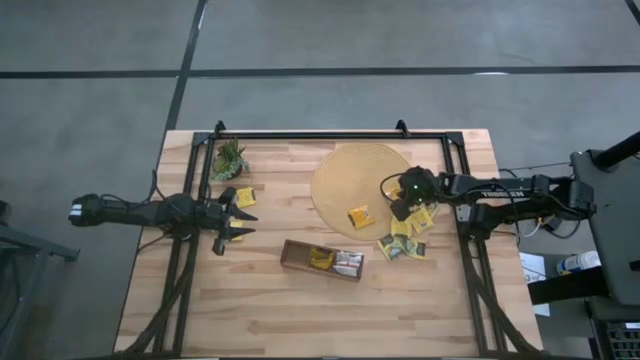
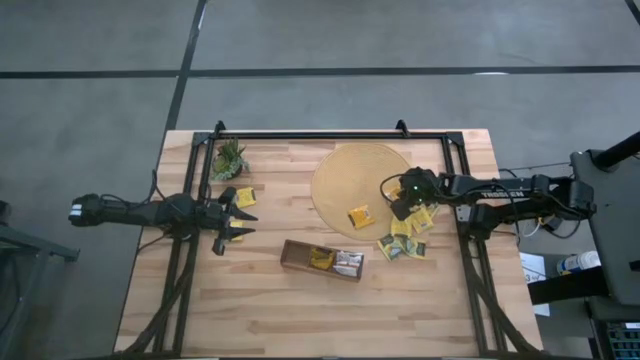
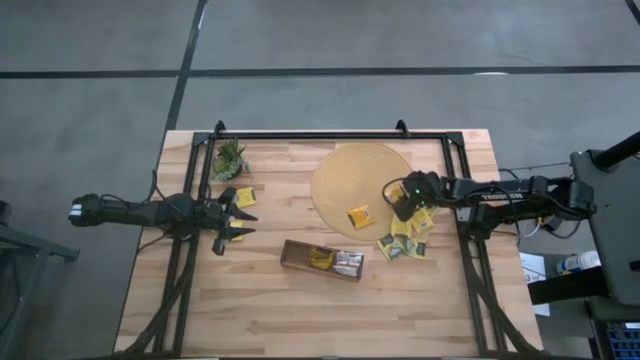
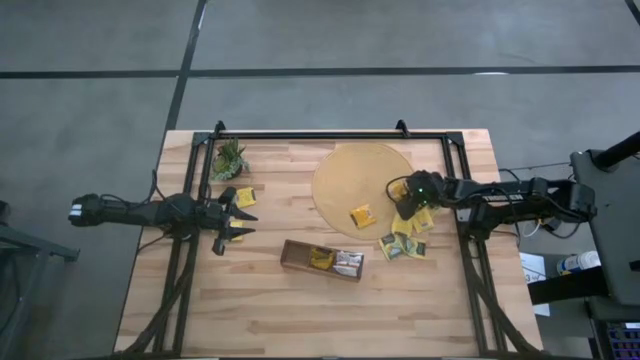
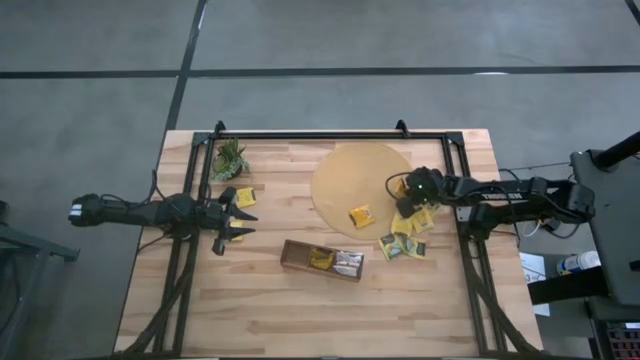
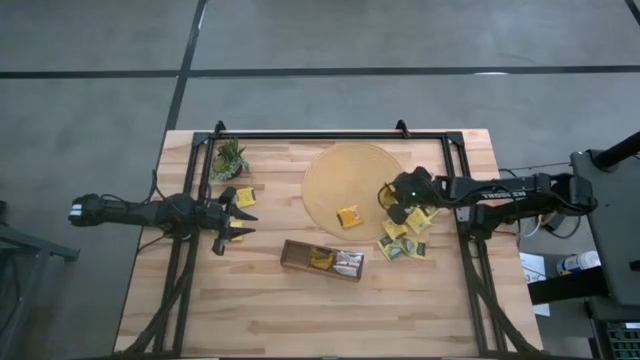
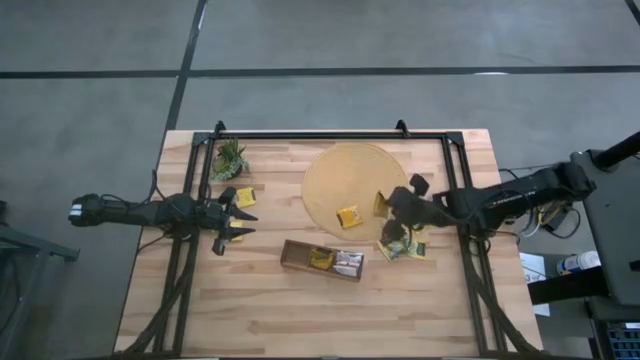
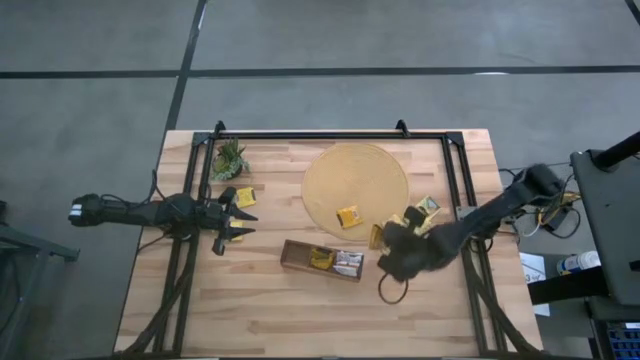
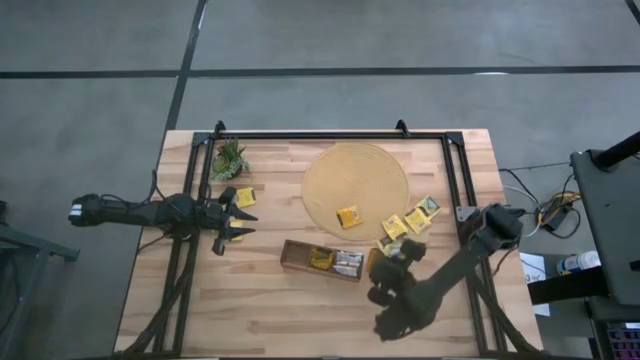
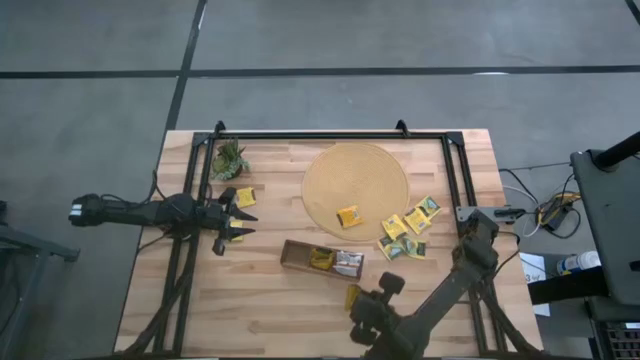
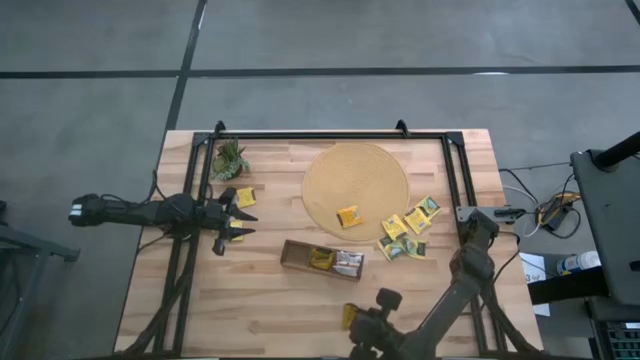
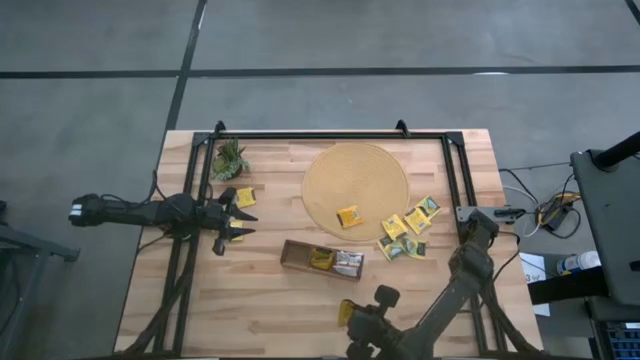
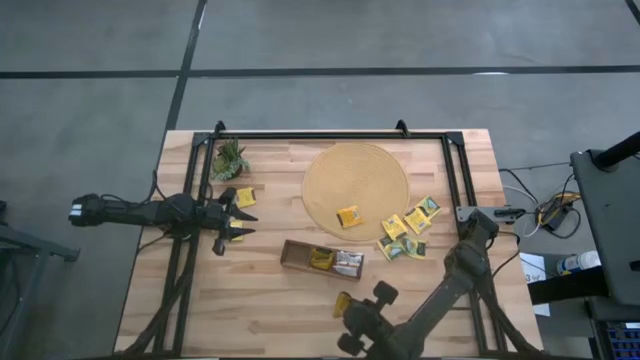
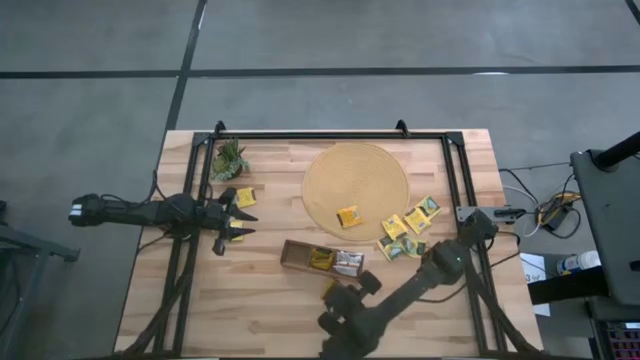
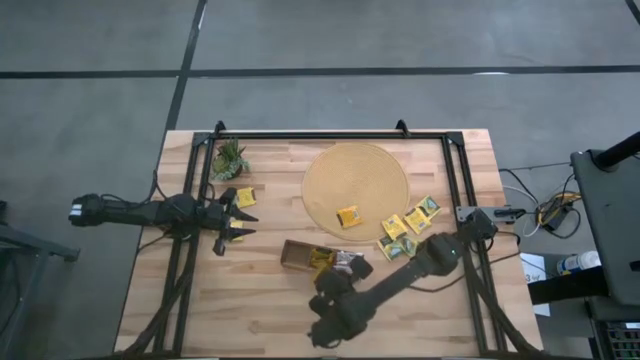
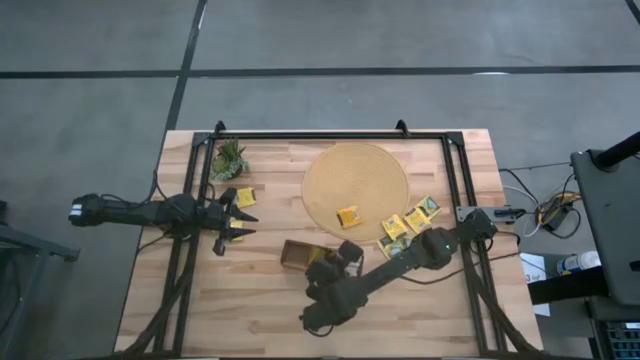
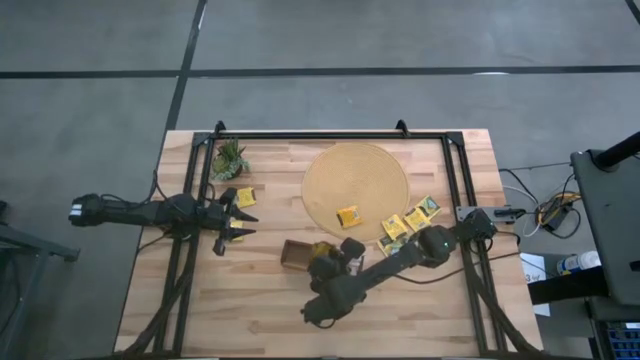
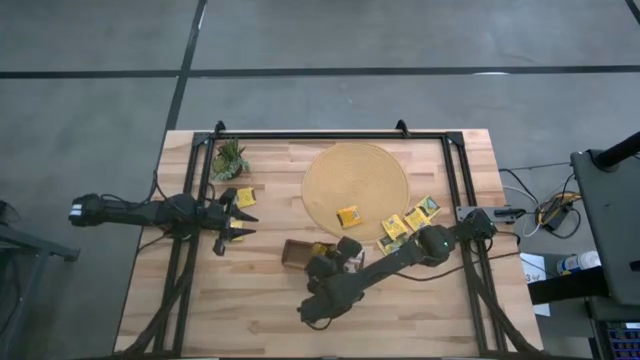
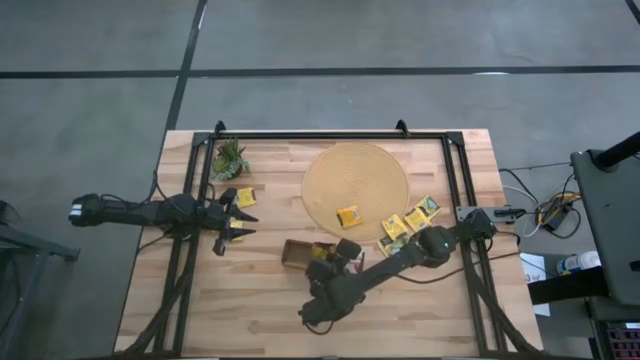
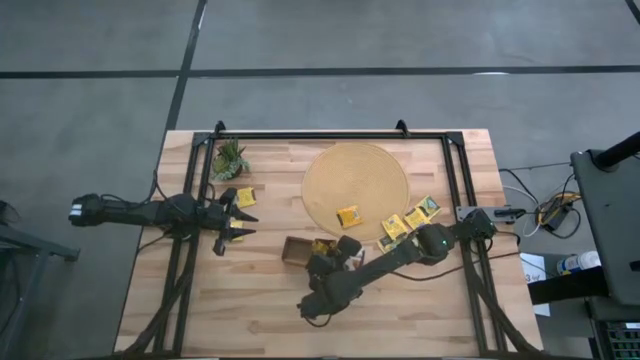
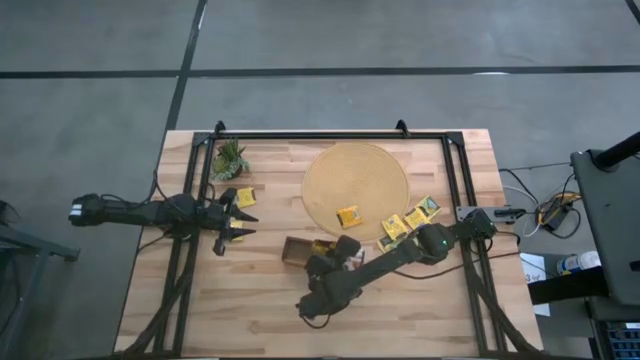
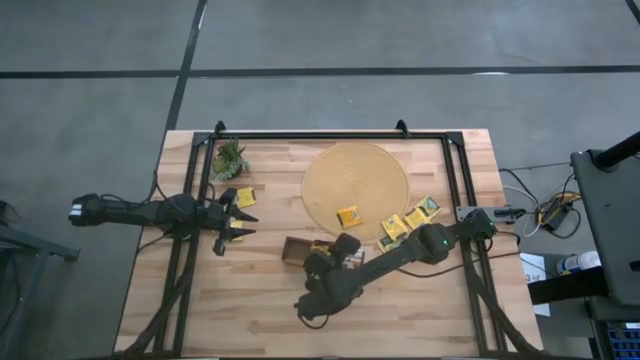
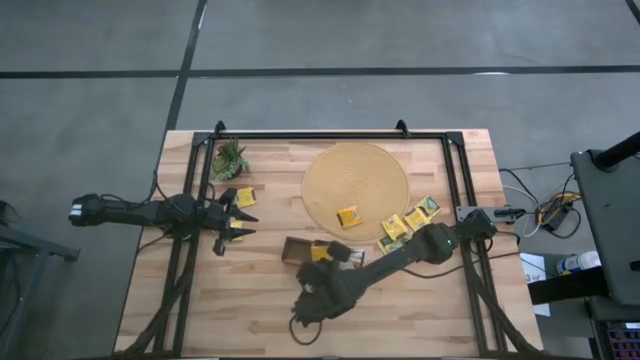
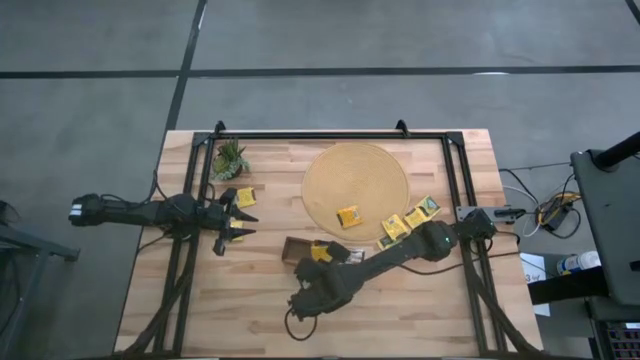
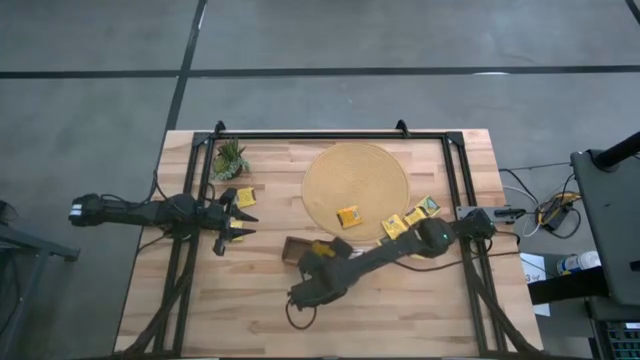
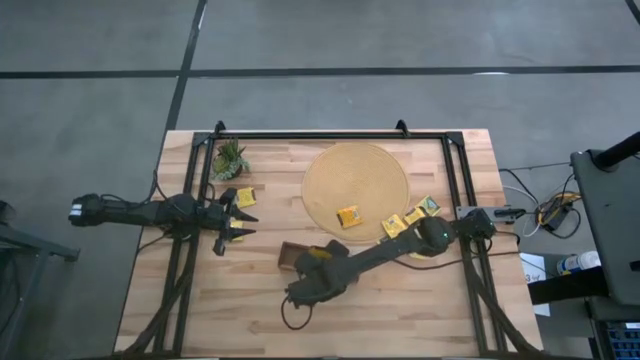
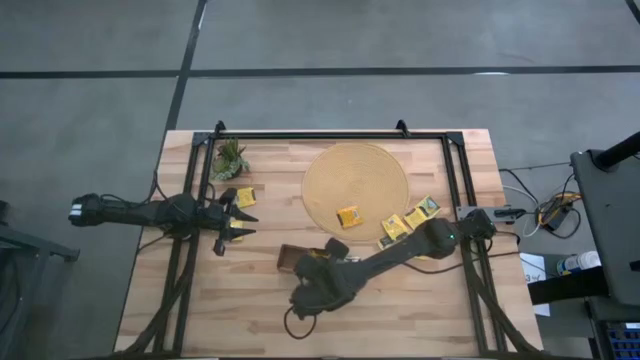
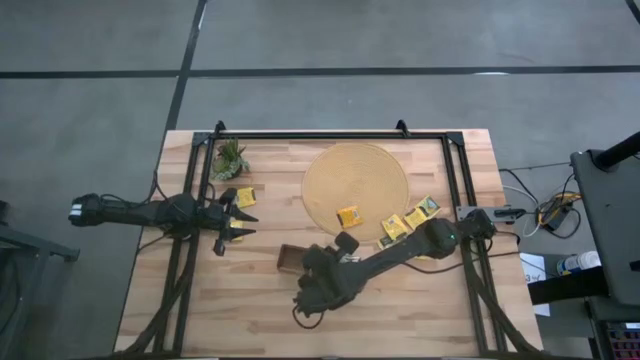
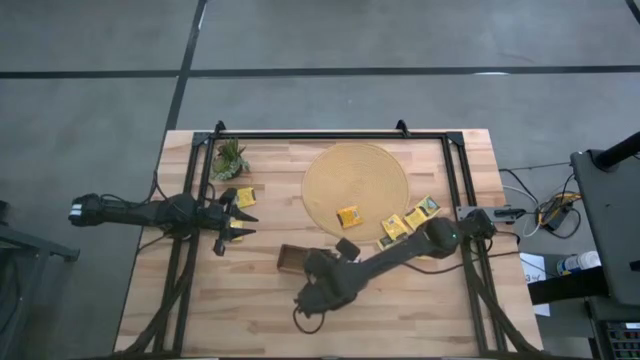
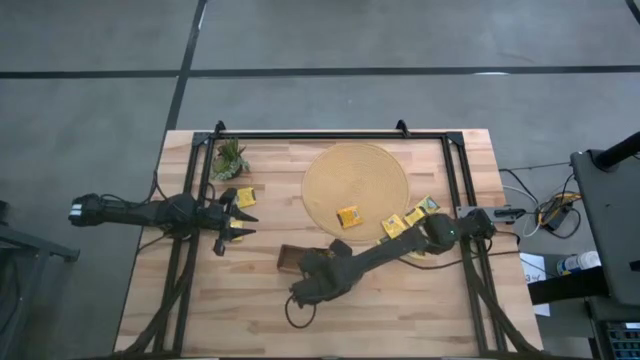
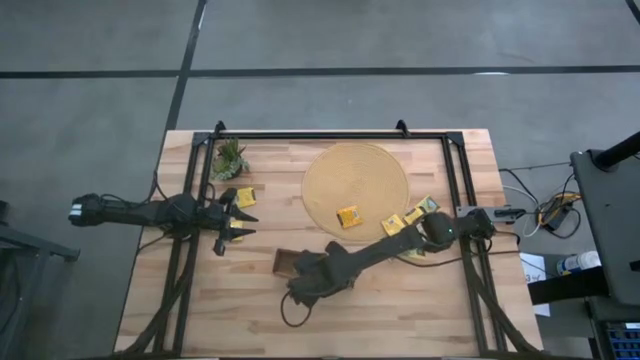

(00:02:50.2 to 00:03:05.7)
Task: Pick & Place Tea
Put the orange tea bag into the middle section of the wooden organizer
